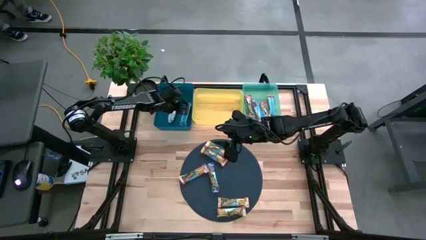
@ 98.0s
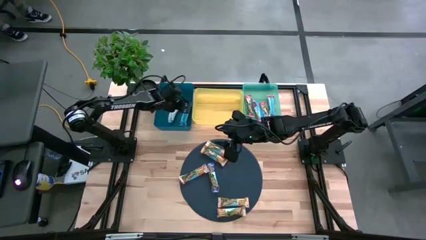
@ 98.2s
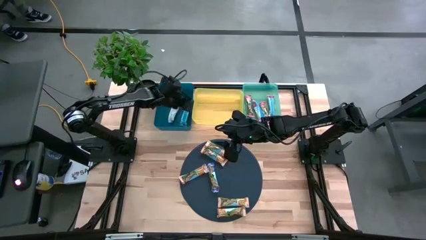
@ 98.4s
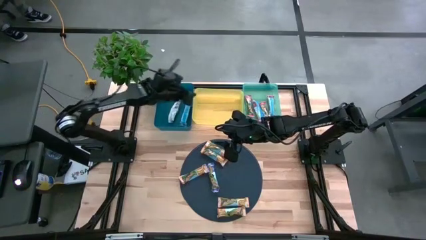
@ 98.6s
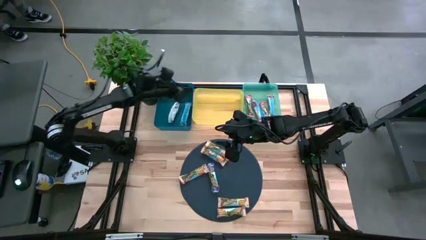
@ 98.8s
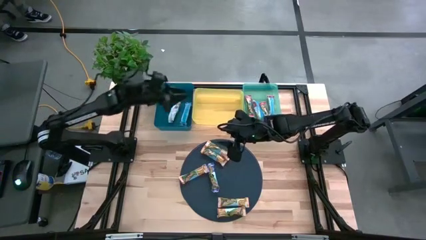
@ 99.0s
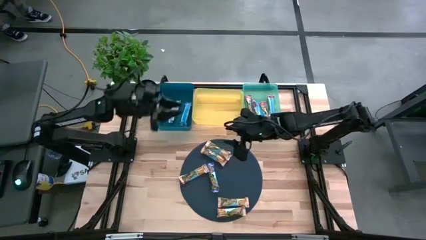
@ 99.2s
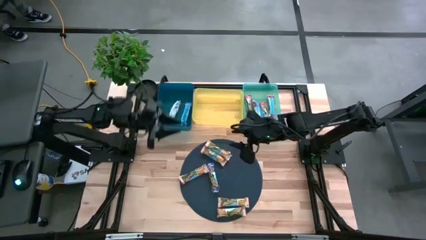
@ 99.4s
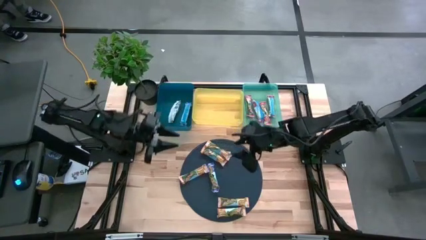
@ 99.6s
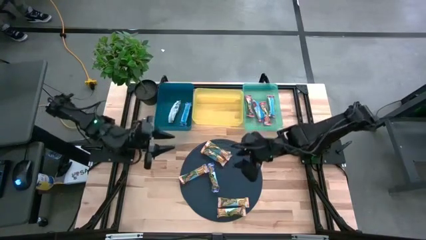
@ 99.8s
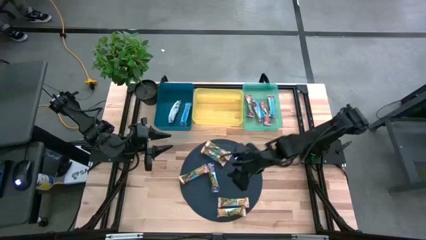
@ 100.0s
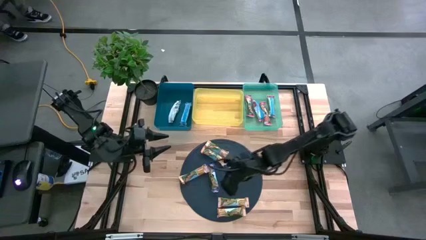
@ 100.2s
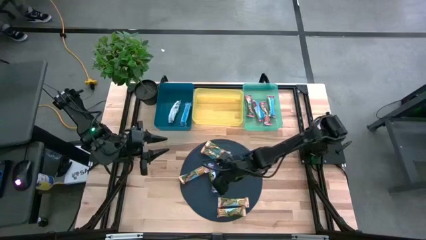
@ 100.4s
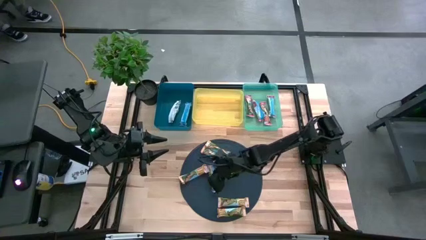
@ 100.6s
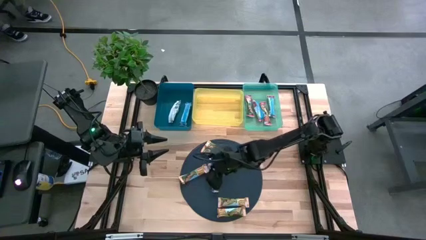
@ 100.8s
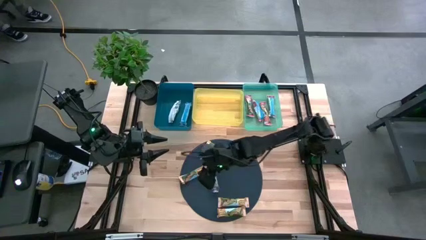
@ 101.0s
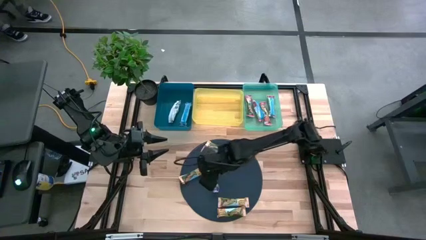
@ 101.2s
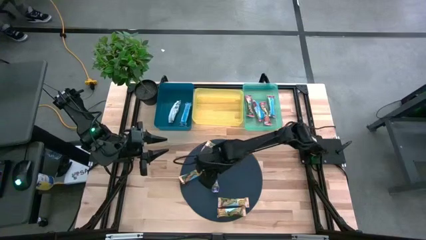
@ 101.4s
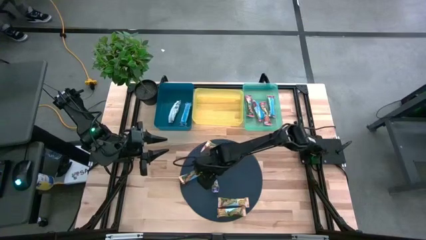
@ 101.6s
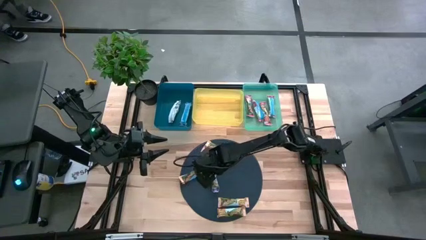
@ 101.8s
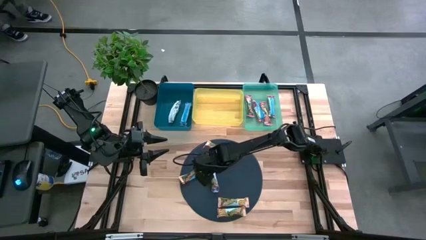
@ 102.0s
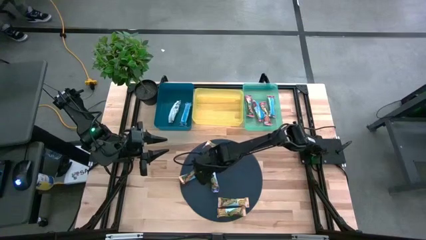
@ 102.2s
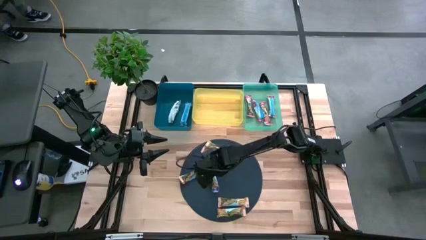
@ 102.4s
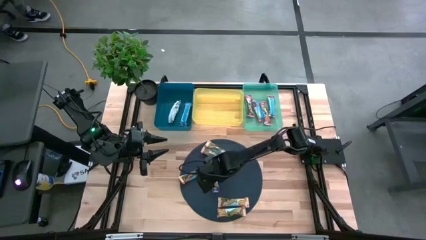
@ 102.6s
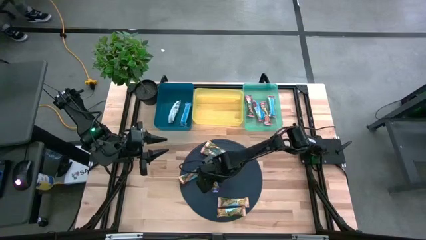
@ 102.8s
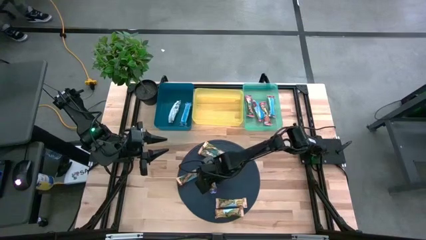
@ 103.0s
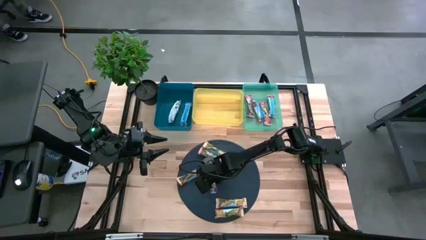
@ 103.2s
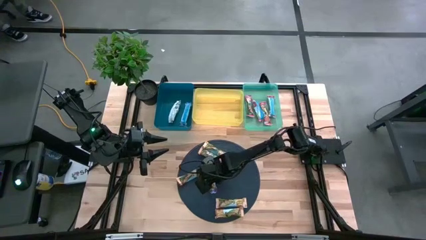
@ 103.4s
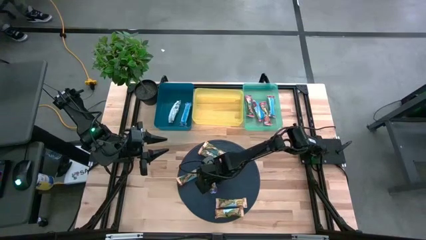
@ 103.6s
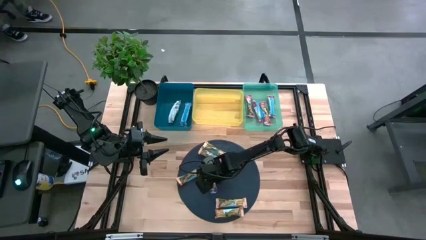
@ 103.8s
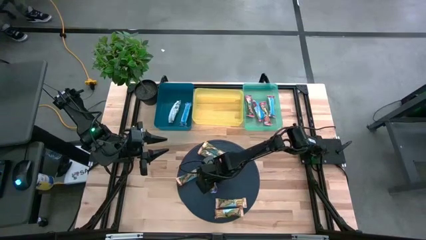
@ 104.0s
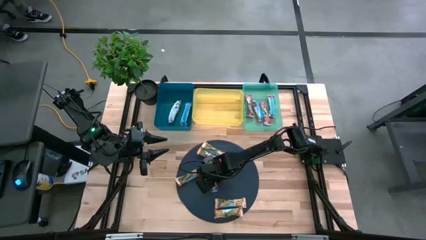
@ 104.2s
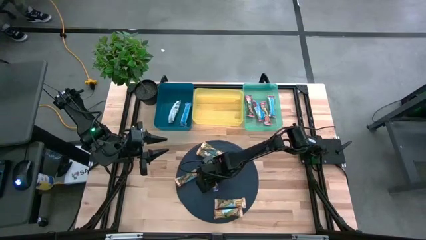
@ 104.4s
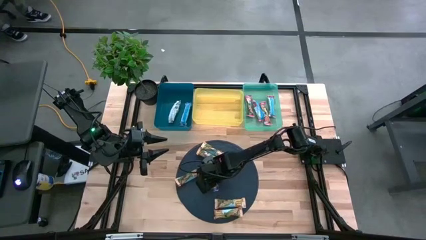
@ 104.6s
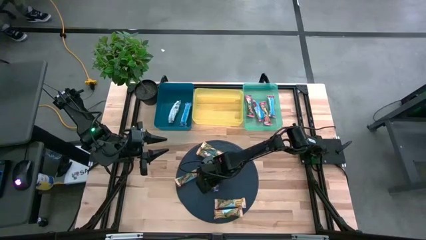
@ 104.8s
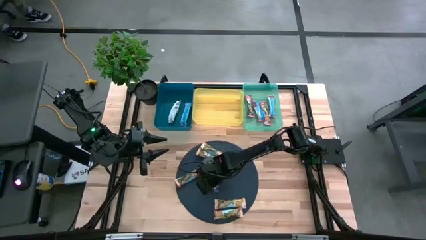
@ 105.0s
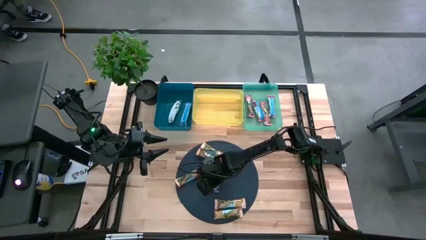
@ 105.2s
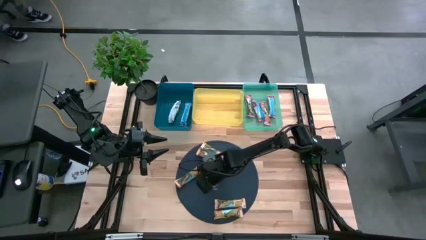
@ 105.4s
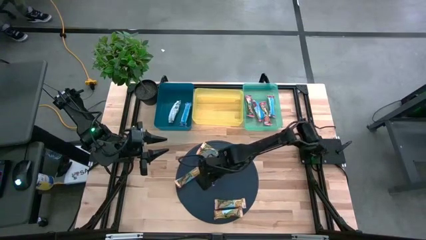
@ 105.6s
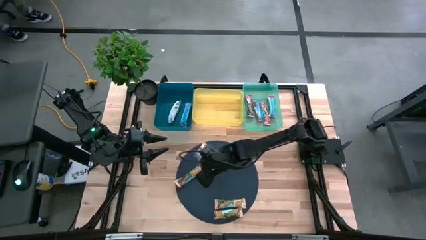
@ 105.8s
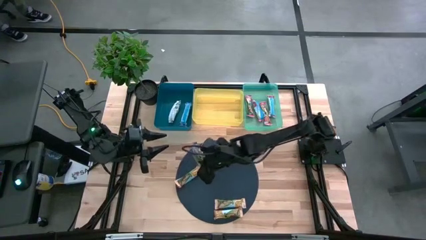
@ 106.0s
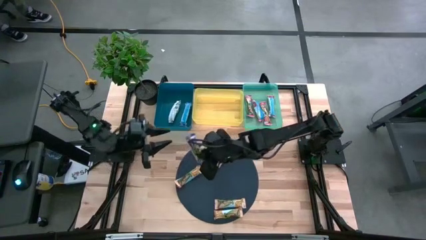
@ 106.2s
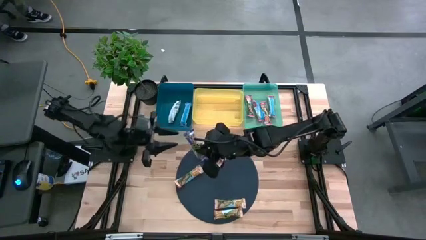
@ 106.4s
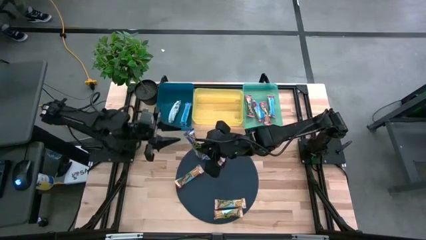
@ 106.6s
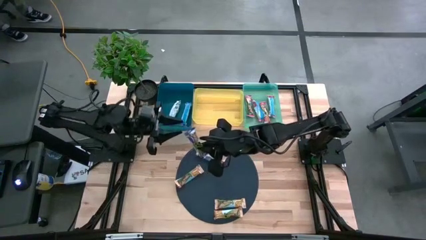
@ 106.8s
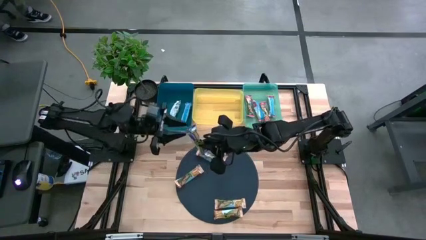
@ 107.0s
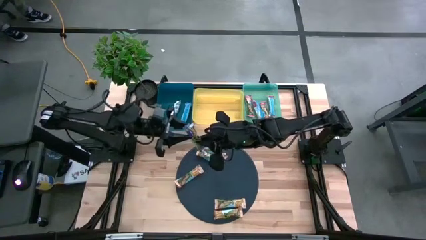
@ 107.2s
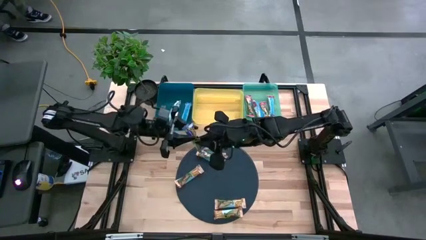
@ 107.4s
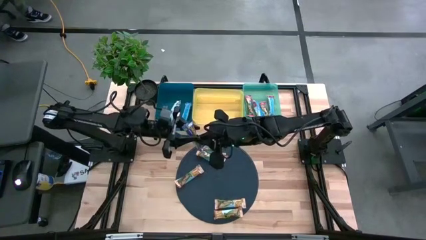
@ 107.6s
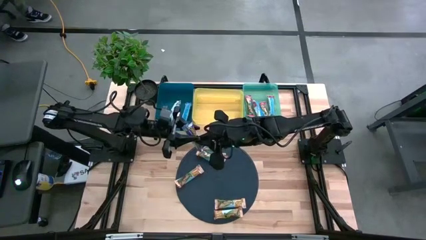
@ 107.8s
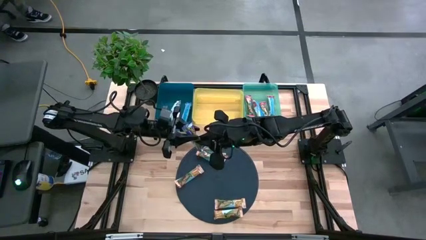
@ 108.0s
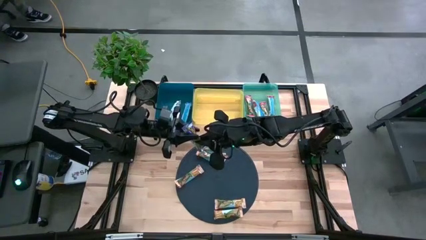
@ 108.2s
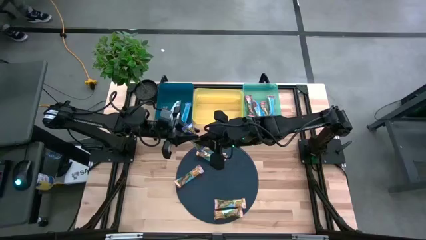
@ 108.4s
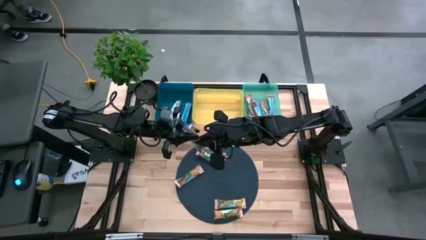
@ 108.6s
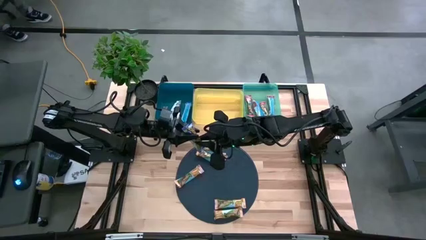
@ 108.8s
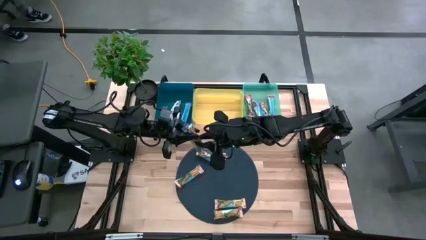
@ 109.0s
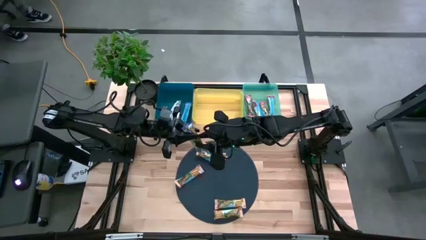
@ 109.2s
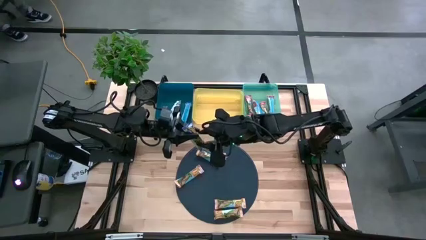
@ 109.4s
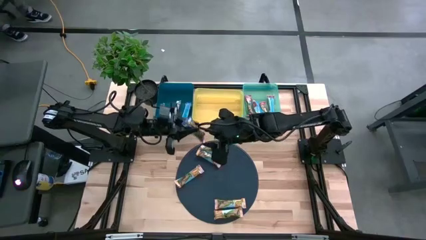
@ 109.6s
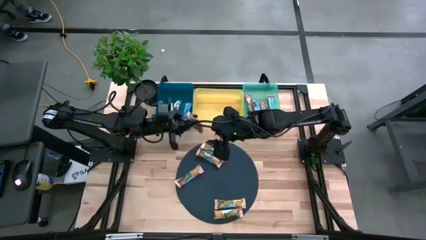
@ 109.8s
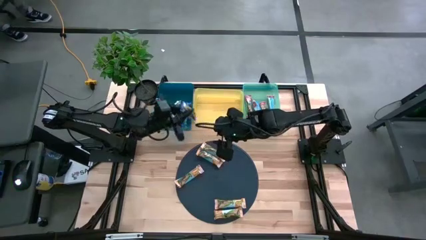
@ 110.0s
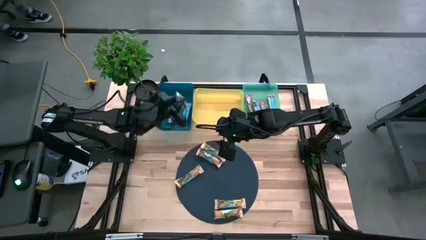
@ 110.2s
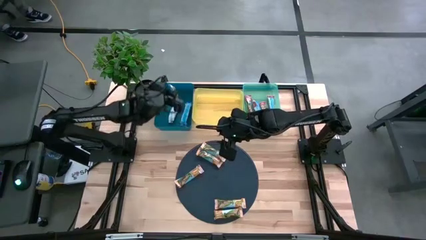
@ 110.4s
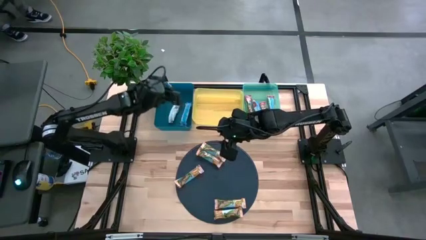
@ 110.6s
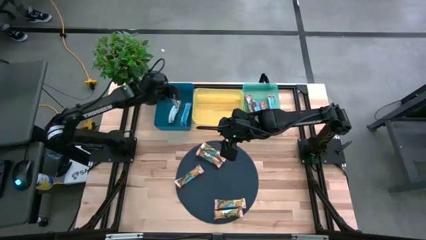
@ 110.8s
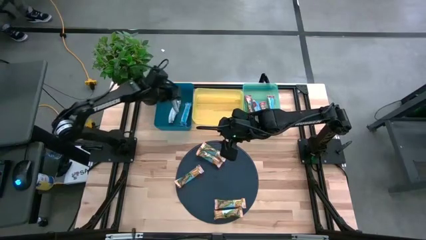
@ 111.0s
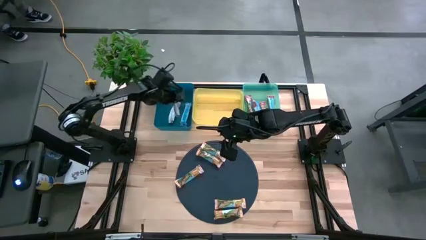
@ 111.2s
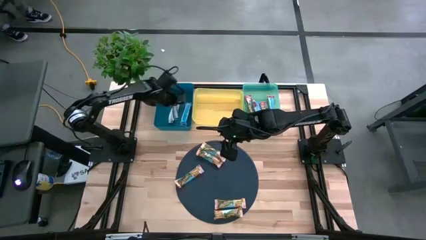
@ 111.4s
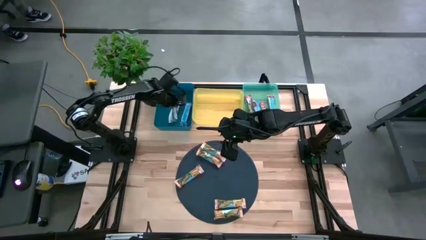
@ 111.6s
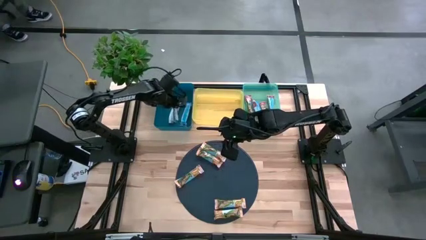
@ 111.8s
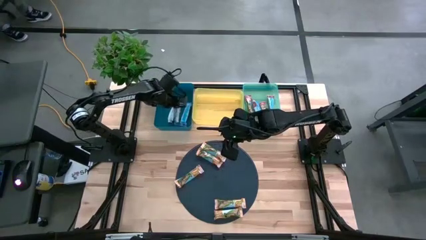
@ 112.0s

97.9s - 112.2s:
Task: Pick and place Granola Bars by type
Put the blue granola bar into the blue bin
